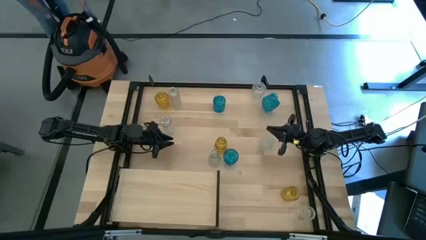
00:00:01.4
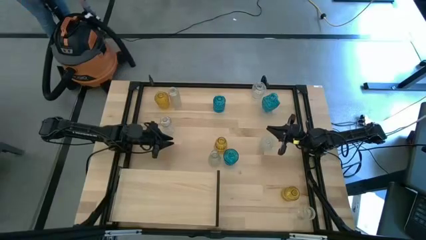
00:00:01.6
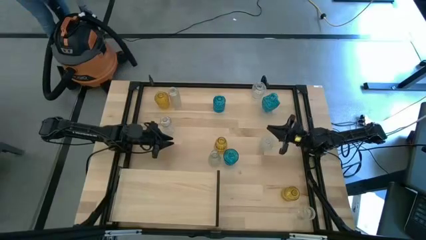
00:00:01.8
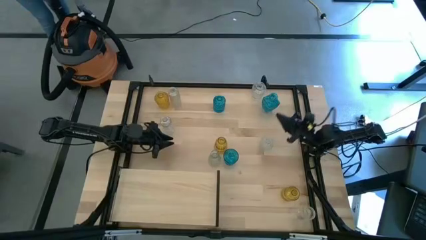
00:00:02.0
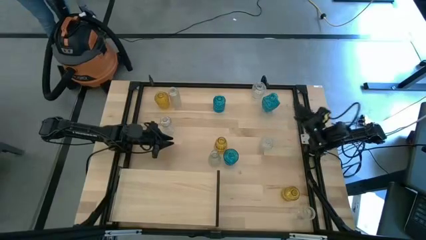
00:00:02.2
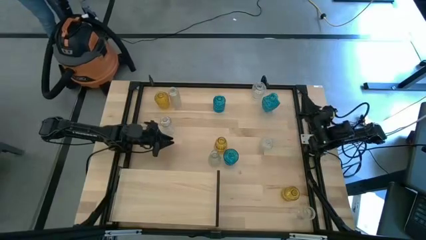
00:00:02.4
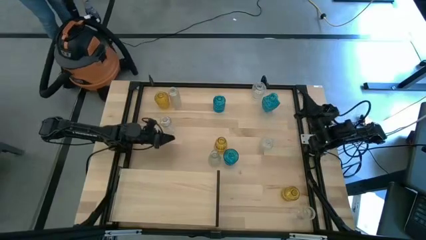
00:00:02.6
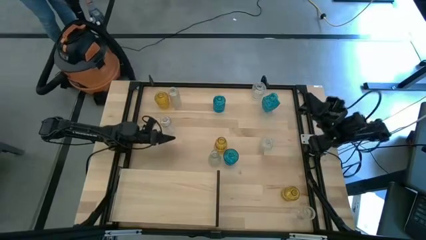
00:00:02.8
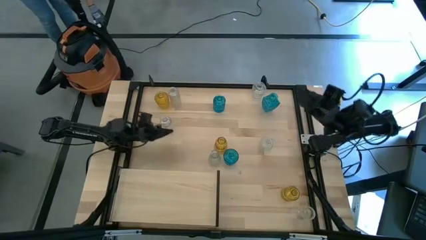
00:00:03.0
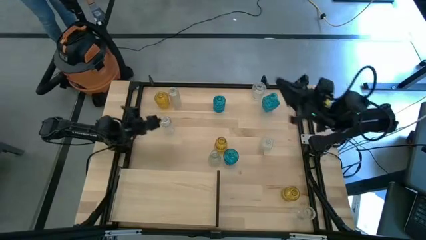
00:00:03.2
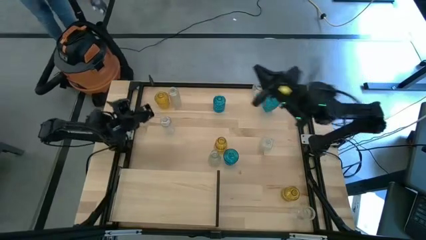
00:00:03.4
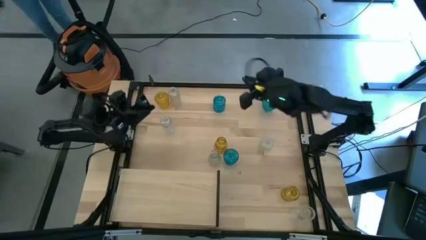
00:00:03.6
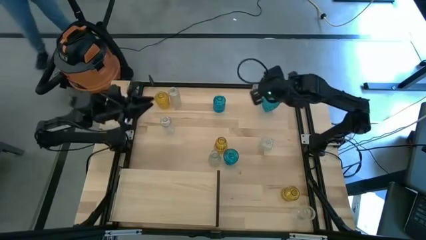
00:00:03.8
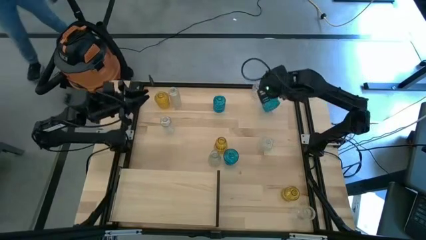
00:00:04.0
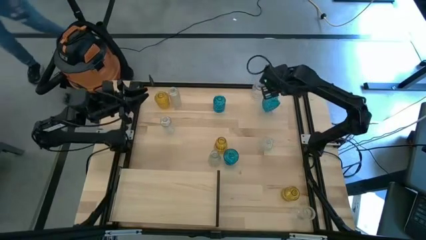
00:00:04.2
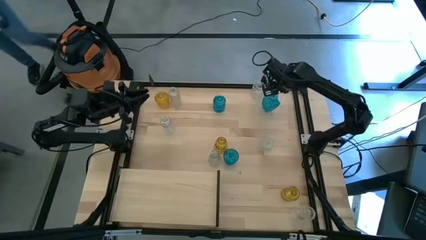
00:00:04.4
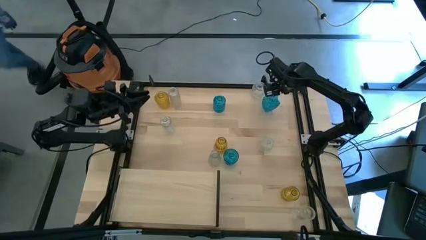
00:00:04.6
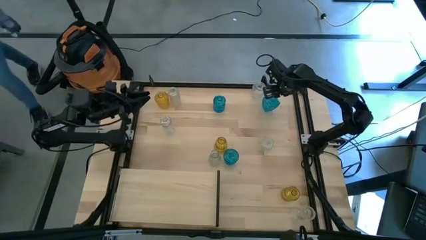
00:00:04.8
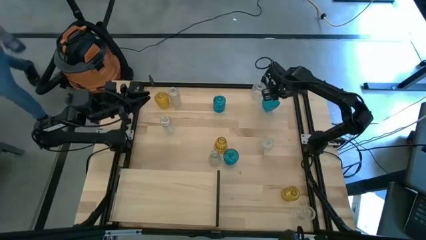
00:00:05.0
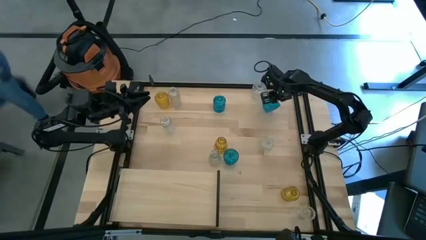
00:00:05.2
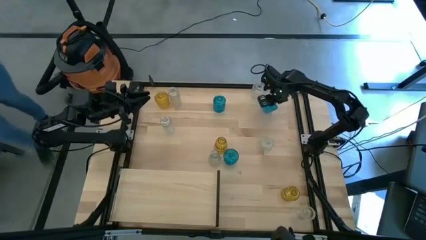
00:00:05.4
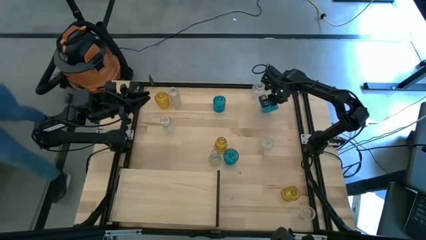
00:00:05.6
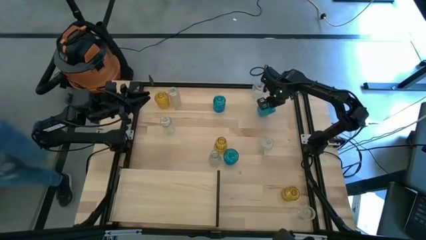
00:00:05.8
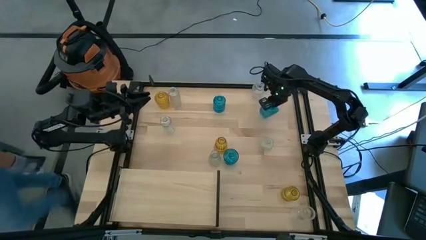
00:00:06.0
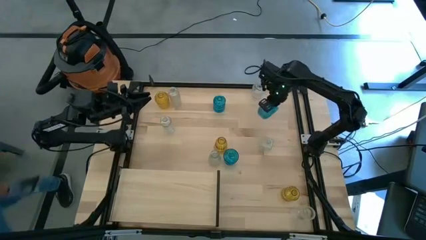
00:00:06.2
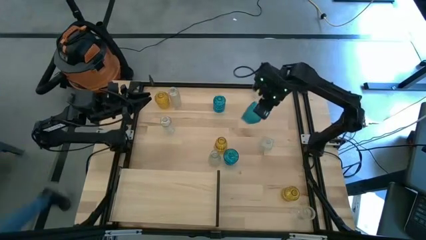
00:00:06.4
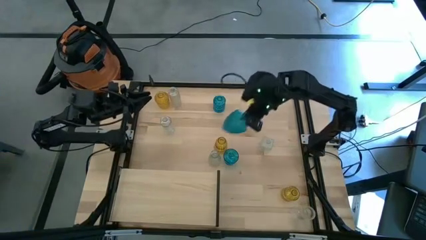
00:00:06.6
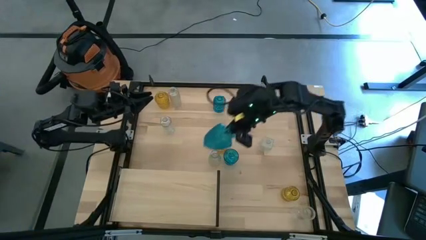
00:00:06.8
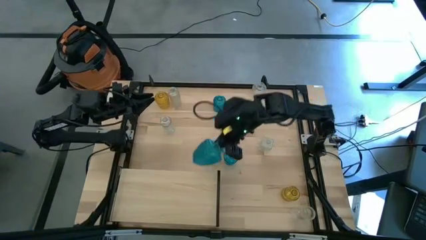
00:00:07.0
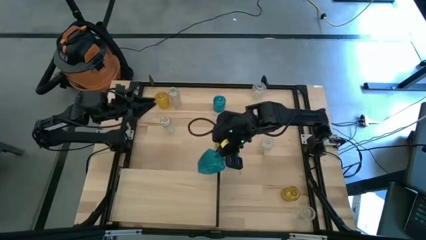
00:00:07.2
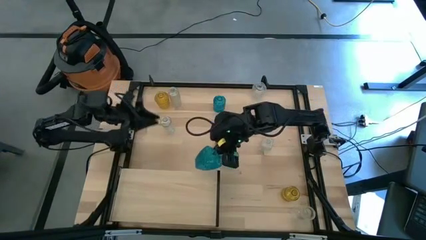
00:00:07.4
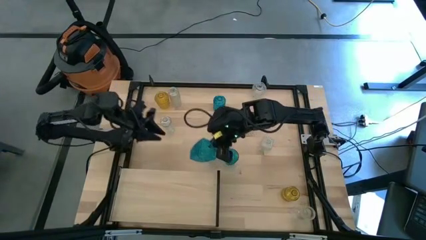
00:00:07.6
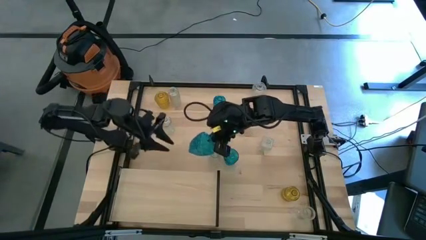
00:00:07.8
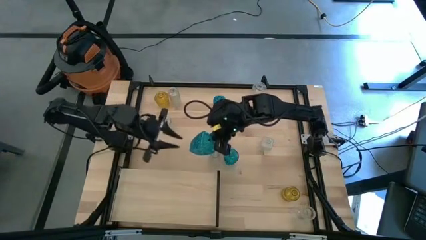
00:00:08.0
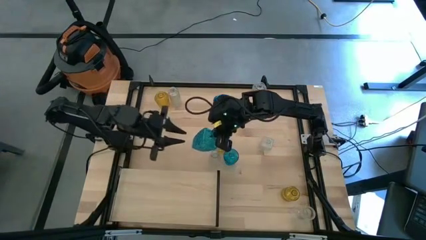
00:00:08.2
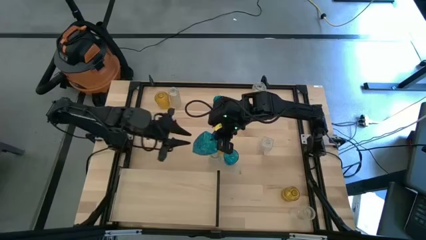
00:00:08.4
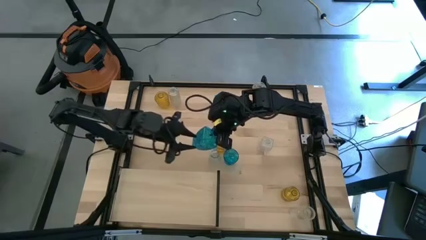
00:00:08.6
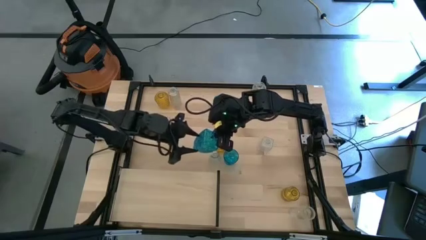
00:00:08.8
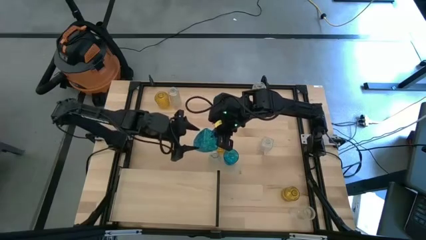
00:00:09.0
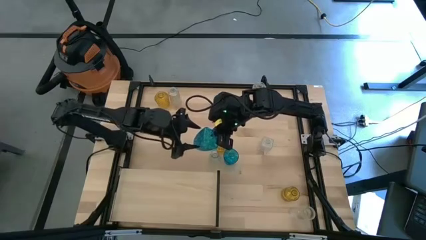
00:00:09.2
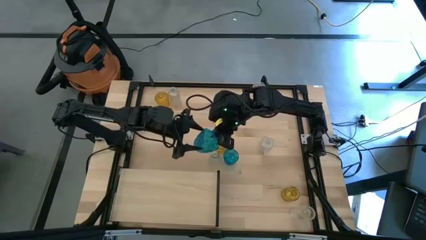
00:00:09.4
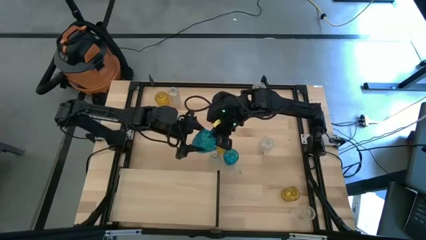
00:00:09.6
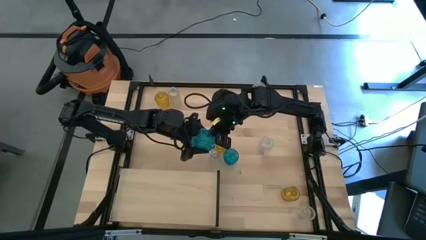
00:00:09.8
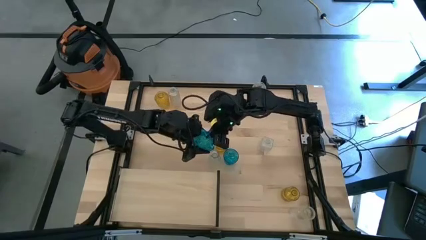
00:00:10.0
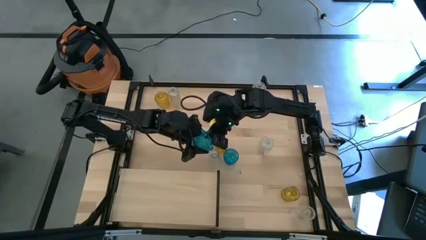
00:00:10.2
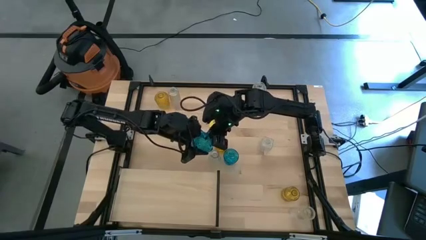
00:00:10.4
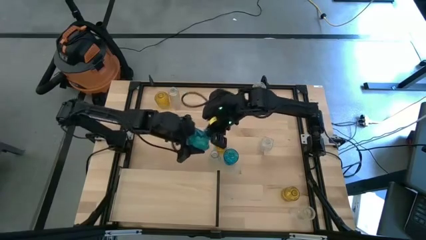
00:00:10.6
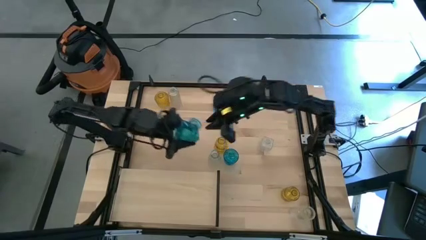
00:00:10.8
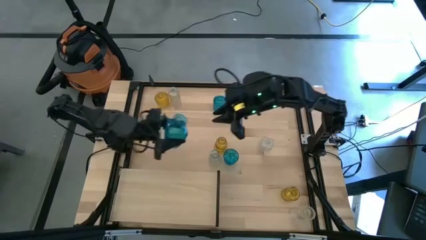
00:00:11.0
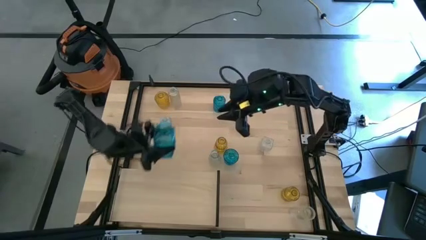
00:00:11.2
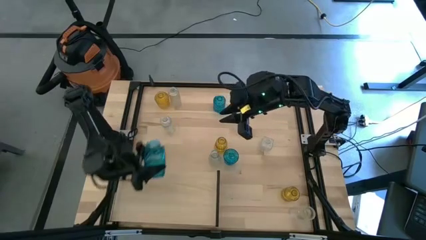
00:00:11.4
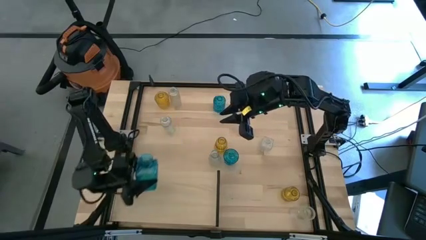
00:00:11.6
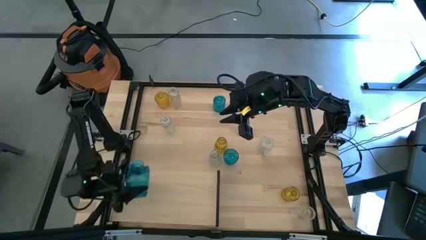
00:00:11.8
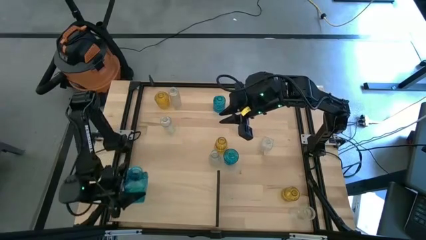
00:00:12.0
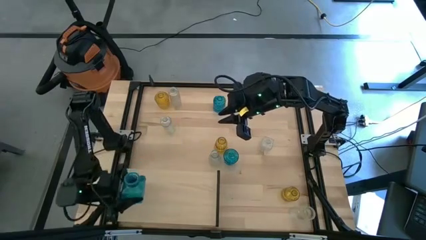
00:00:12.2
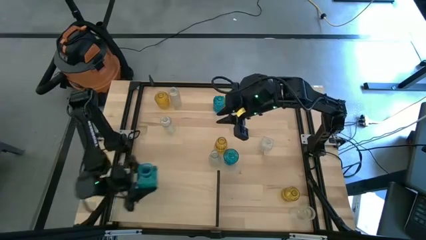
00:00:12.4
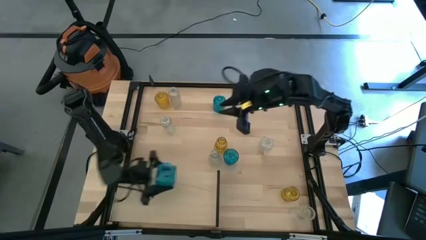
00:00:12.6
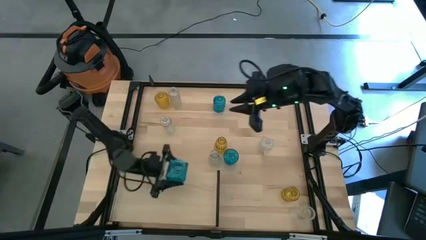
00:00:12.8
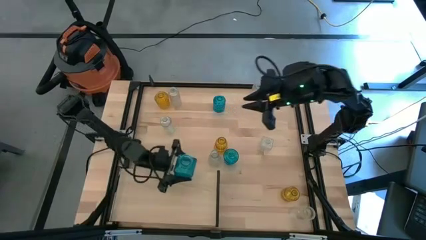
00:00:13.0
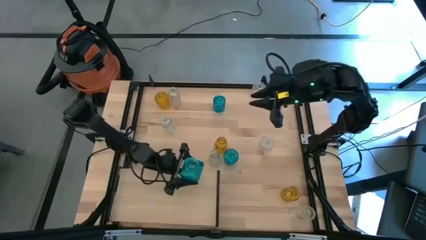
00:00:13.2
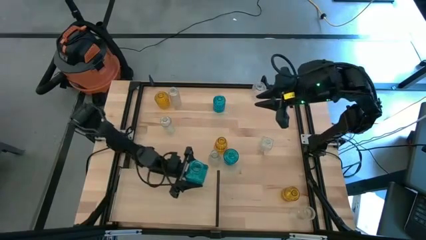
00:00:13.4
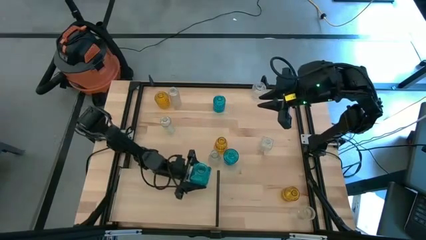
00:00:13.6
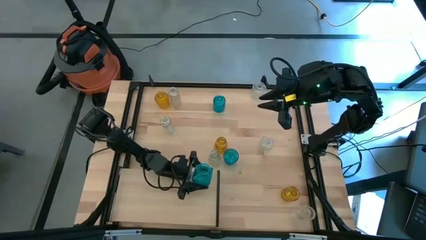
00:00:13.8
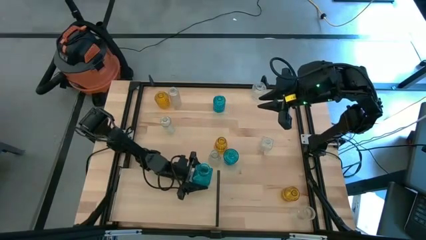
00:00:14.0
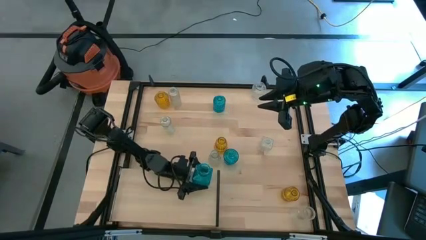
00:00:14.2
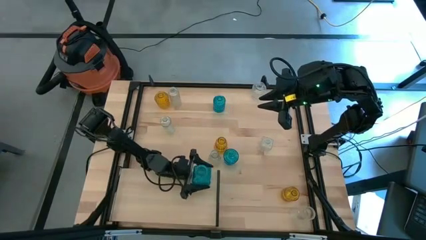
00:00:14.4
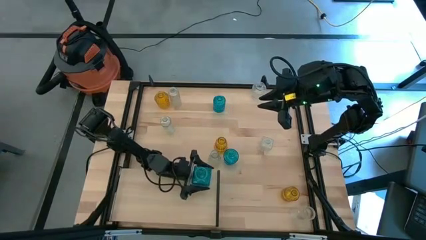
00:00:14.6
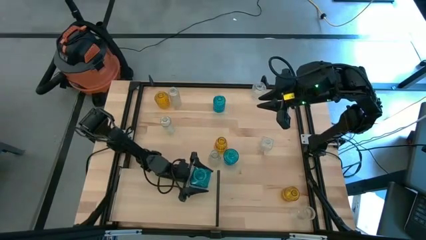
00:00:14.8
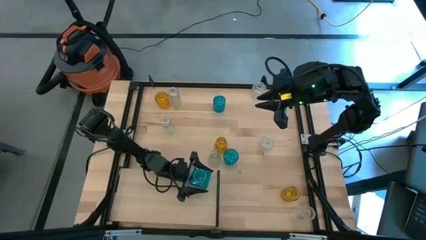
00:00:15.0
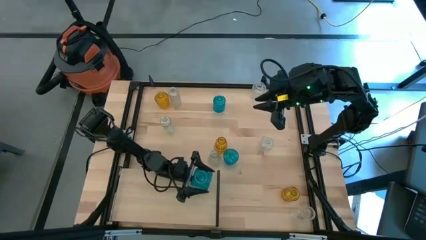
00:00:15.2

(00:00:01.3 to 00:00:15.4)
Task: sort vases onto shelf
Put the blue vase on the shelf

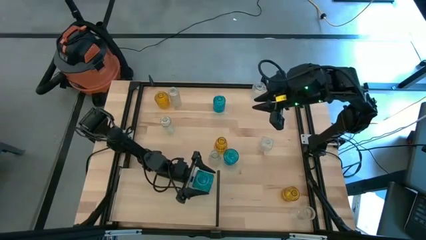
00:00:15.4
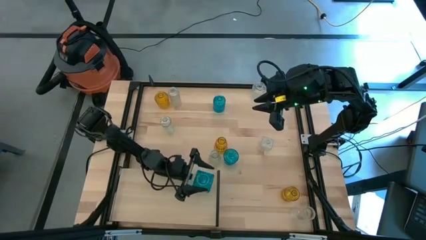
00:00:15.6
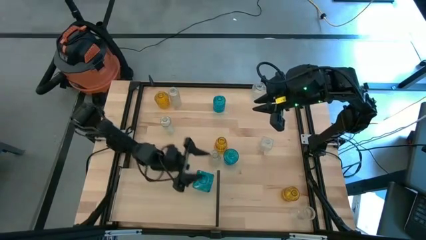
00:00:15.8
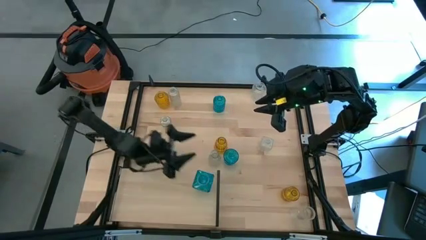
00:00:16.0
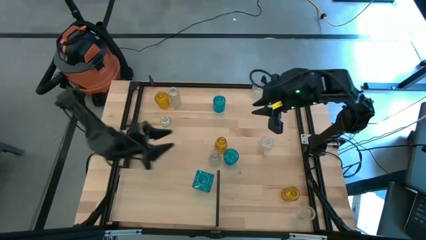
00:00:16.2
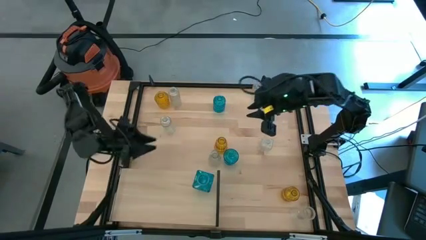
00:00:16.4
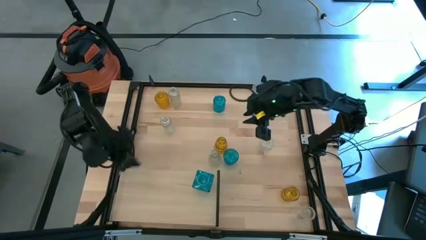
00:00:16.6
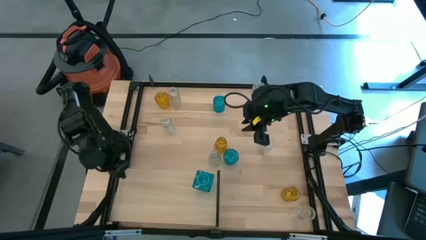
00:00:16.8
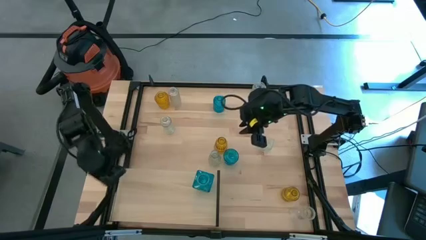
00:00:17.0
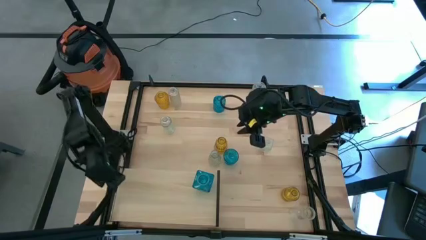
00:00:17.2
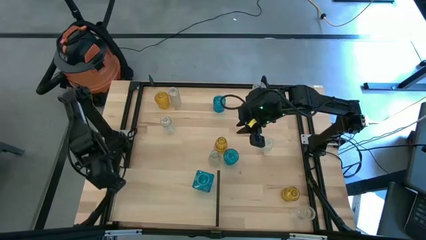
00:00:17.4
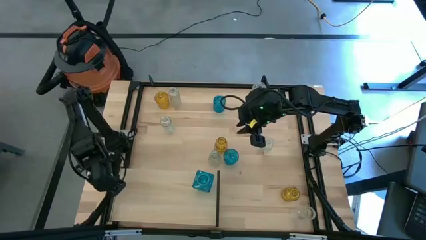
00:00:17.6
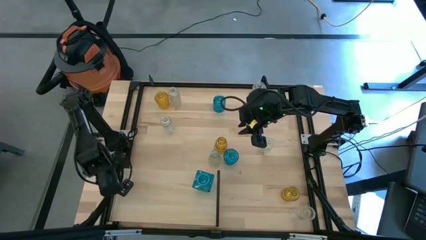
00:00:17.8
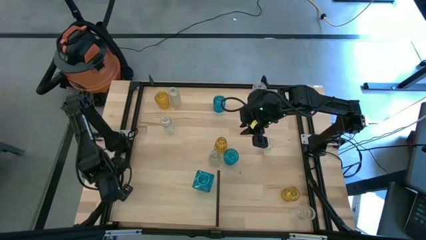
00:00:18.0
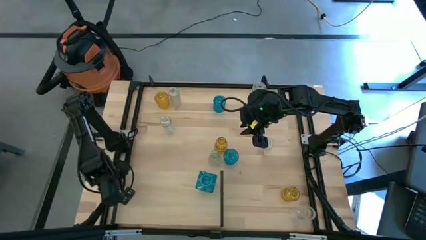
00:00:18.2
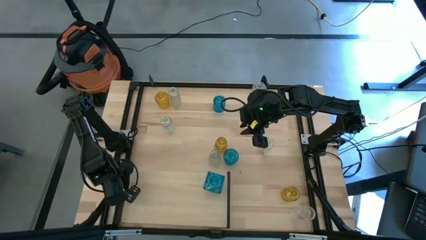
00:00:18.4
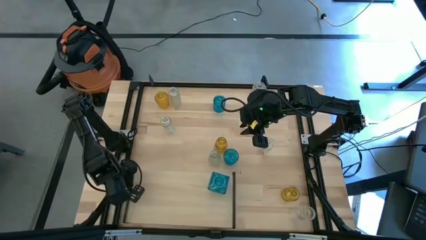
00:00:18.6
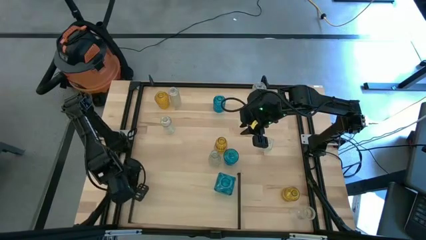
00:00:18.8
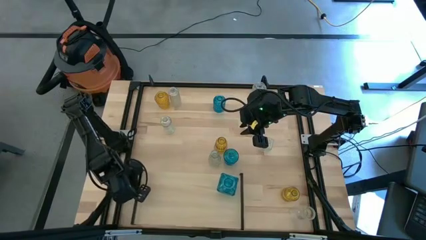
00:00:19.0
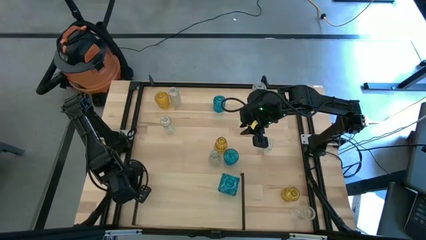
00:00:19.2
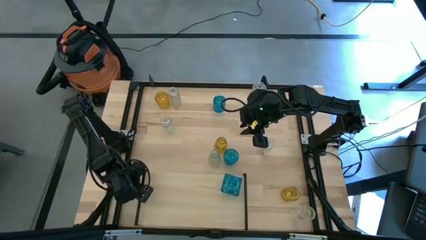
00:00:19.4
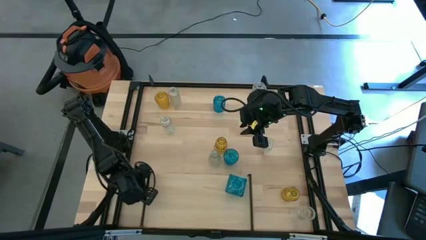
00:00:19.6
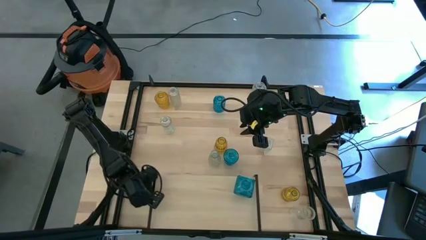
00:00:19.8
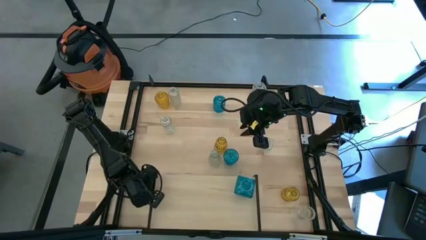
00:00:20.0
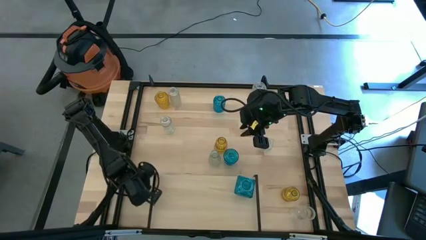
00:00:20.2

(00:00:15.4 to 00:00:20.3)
Adjust the shelf on the table
